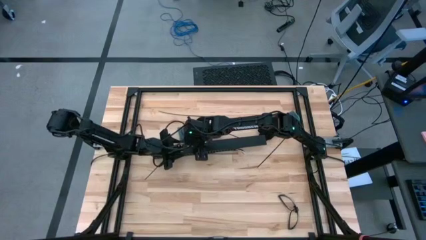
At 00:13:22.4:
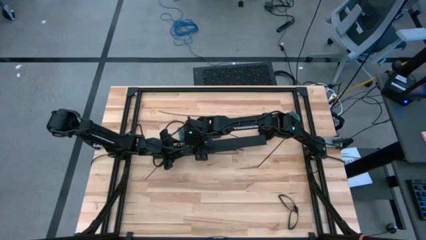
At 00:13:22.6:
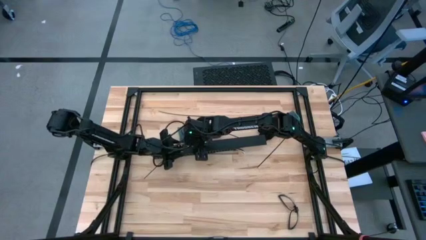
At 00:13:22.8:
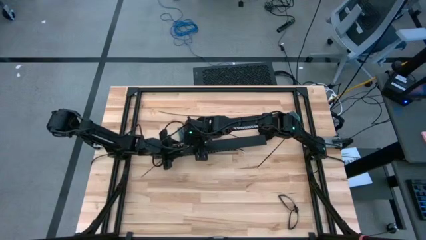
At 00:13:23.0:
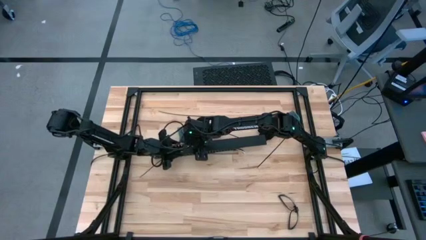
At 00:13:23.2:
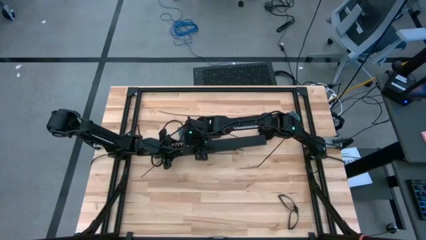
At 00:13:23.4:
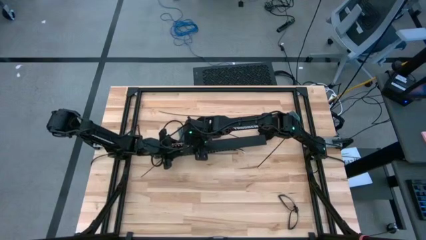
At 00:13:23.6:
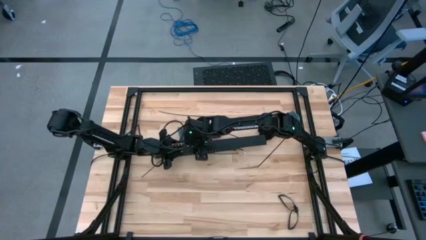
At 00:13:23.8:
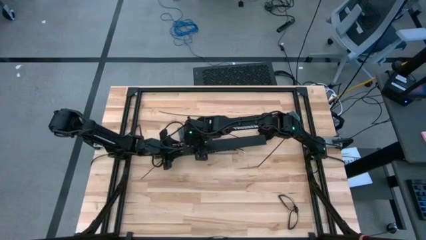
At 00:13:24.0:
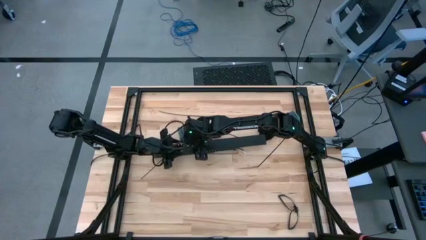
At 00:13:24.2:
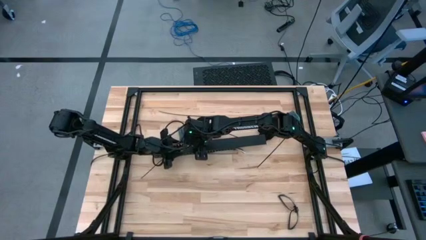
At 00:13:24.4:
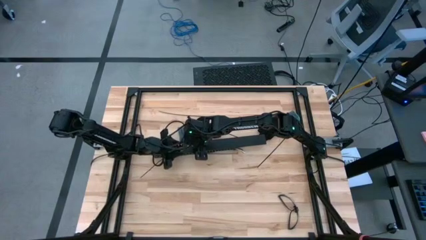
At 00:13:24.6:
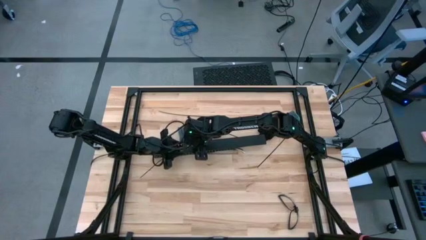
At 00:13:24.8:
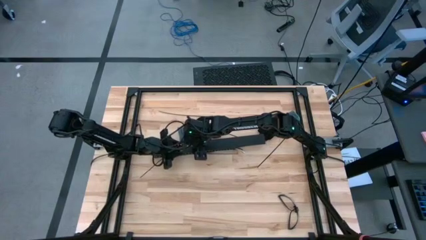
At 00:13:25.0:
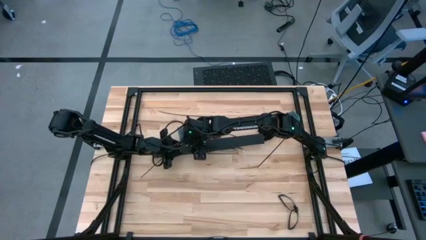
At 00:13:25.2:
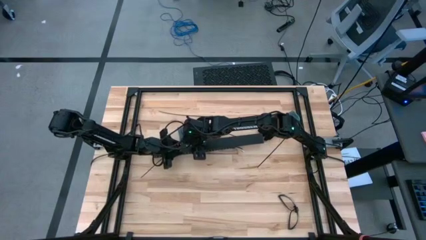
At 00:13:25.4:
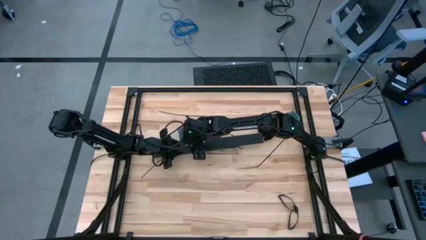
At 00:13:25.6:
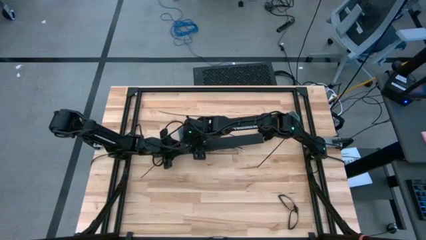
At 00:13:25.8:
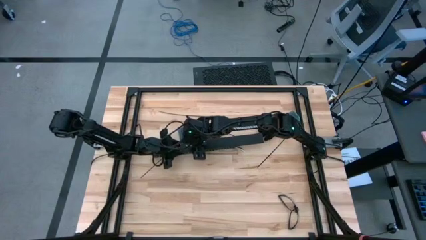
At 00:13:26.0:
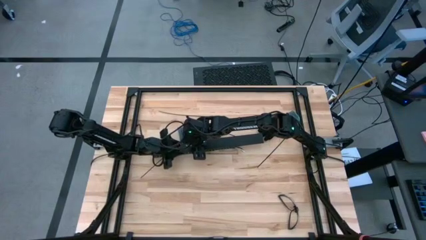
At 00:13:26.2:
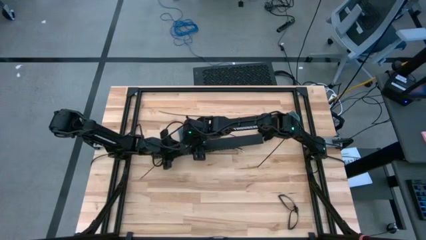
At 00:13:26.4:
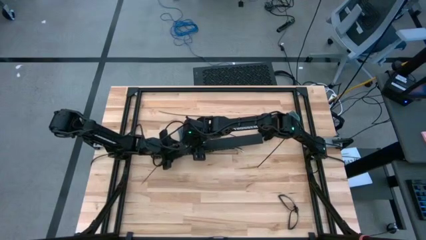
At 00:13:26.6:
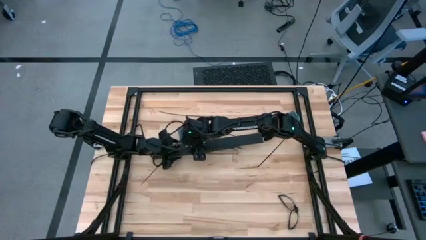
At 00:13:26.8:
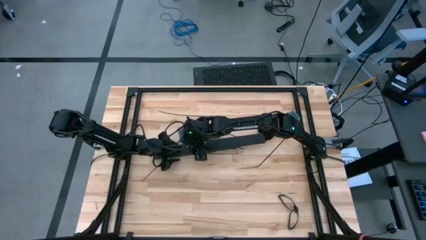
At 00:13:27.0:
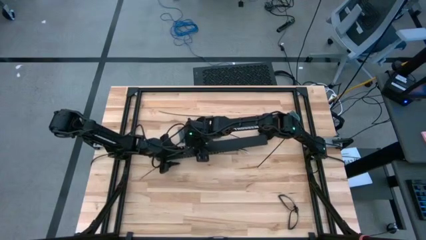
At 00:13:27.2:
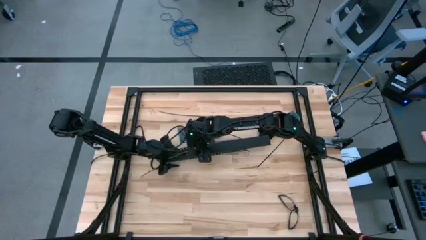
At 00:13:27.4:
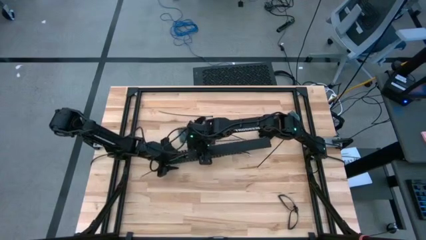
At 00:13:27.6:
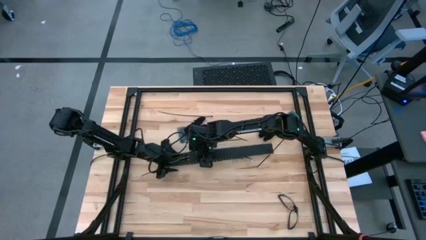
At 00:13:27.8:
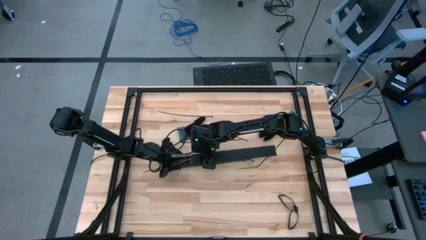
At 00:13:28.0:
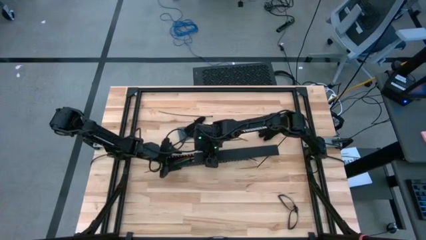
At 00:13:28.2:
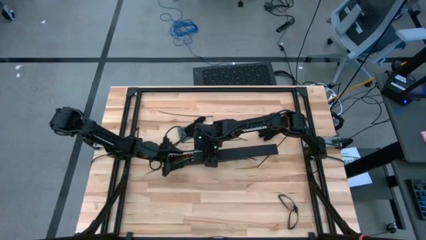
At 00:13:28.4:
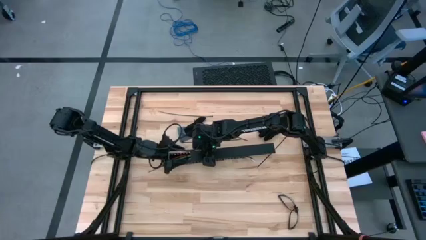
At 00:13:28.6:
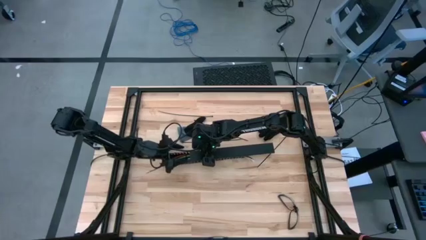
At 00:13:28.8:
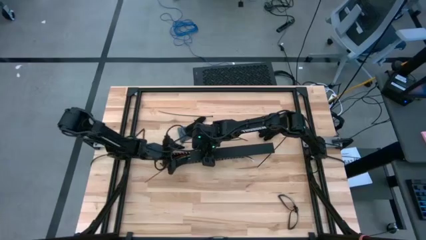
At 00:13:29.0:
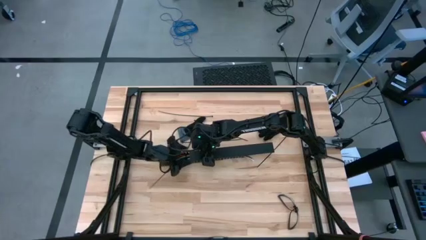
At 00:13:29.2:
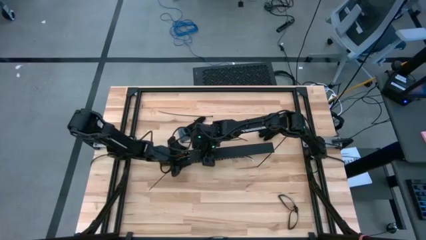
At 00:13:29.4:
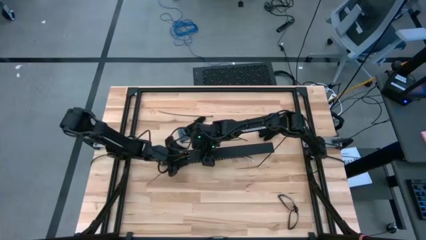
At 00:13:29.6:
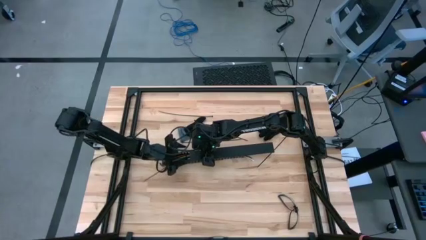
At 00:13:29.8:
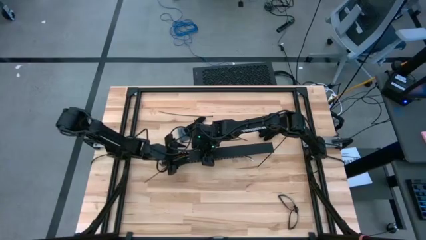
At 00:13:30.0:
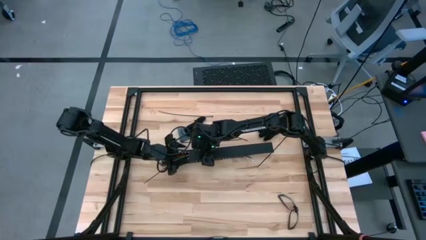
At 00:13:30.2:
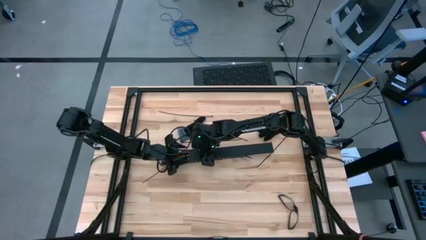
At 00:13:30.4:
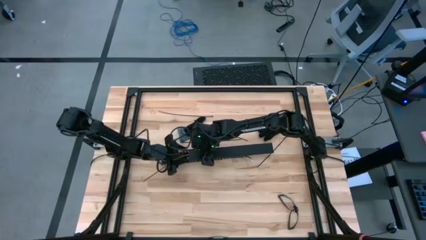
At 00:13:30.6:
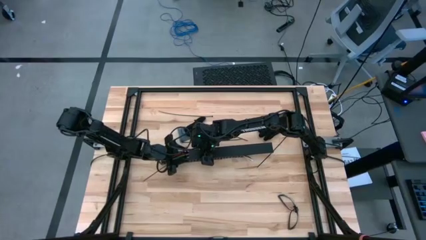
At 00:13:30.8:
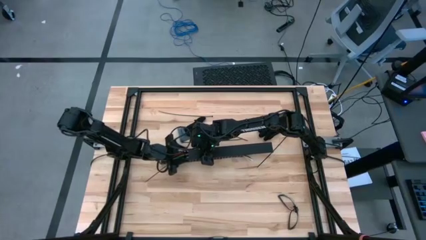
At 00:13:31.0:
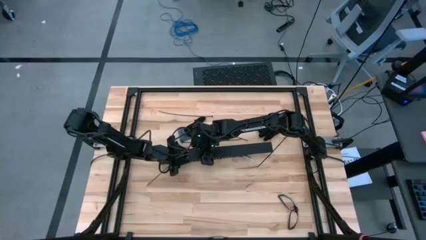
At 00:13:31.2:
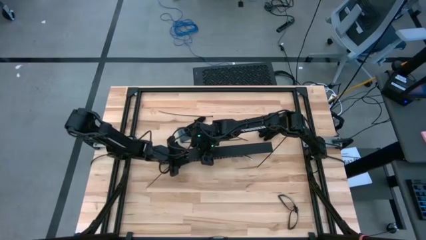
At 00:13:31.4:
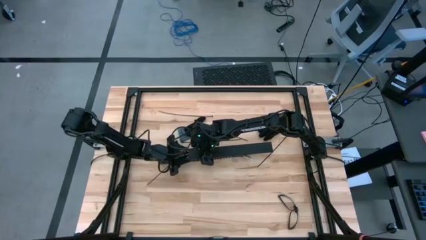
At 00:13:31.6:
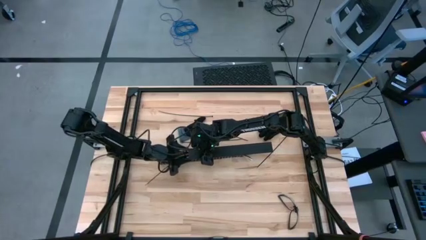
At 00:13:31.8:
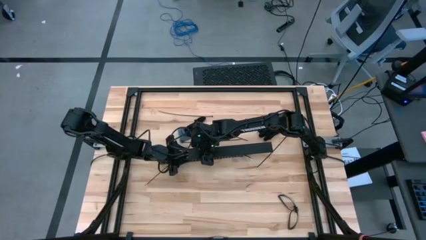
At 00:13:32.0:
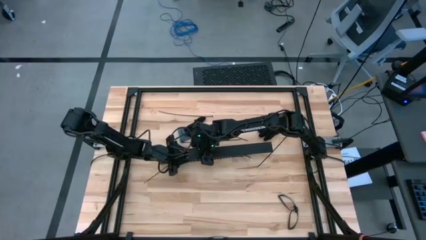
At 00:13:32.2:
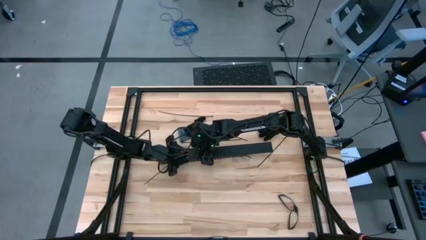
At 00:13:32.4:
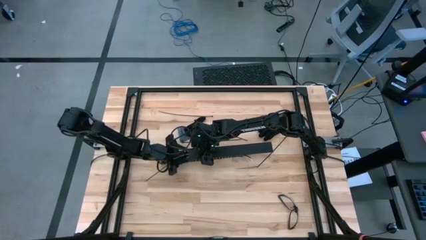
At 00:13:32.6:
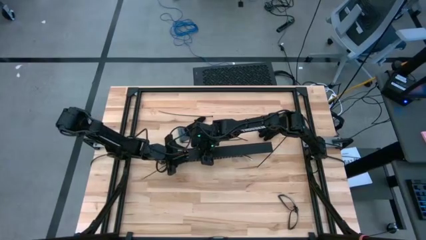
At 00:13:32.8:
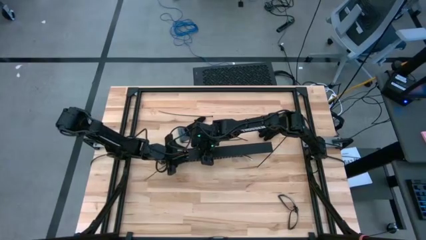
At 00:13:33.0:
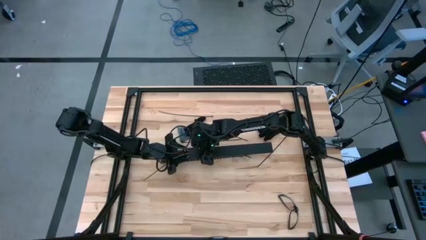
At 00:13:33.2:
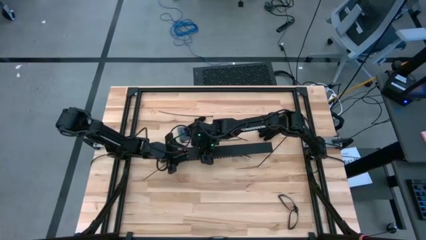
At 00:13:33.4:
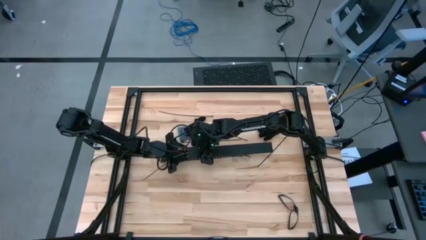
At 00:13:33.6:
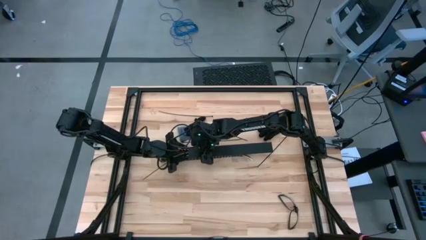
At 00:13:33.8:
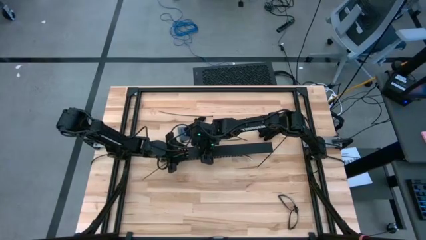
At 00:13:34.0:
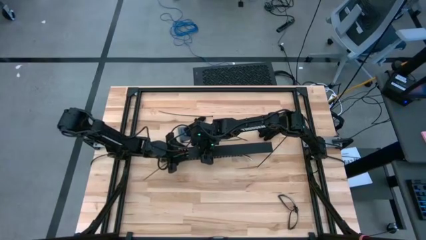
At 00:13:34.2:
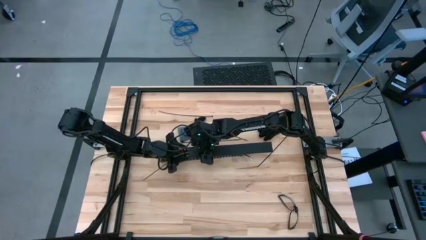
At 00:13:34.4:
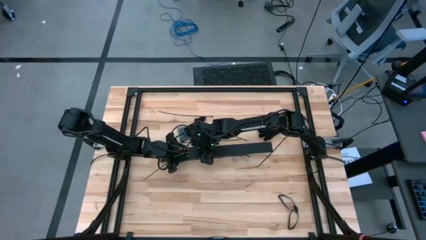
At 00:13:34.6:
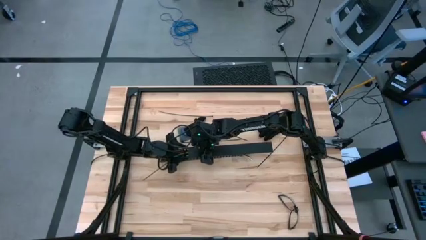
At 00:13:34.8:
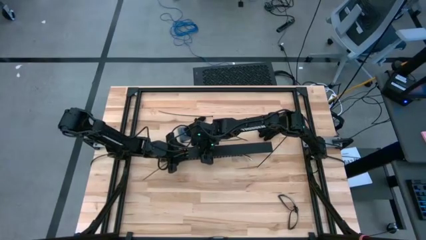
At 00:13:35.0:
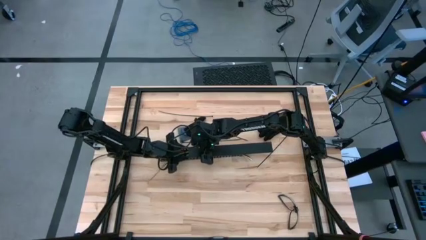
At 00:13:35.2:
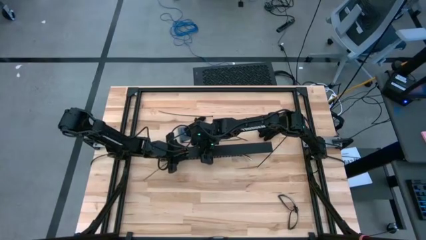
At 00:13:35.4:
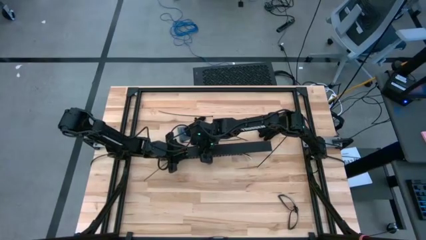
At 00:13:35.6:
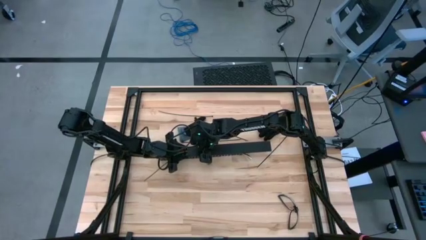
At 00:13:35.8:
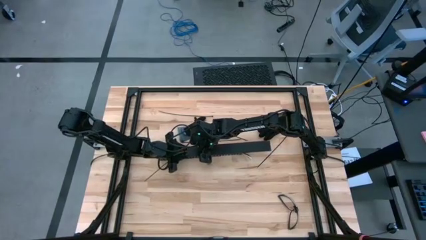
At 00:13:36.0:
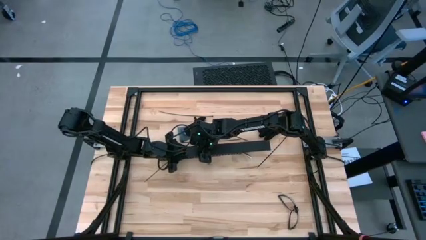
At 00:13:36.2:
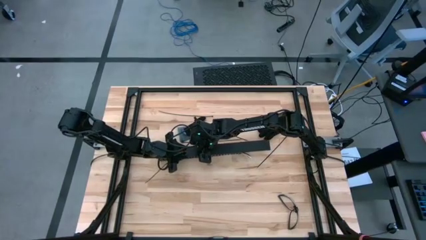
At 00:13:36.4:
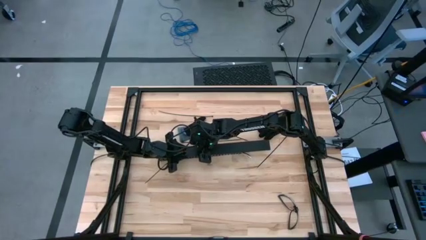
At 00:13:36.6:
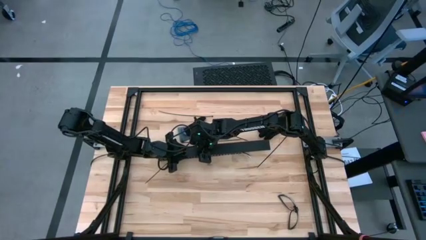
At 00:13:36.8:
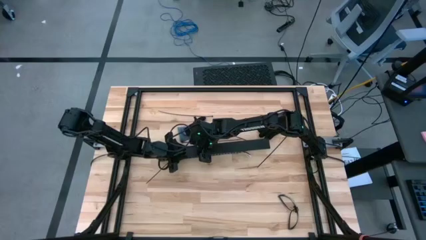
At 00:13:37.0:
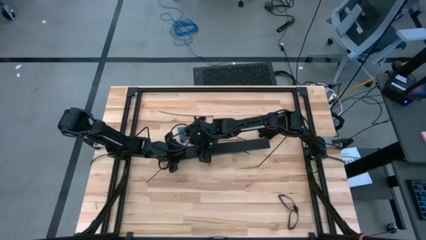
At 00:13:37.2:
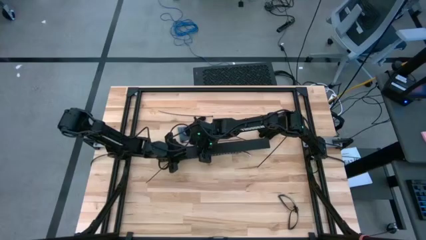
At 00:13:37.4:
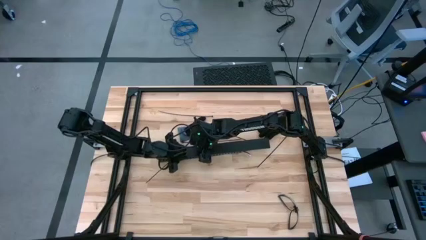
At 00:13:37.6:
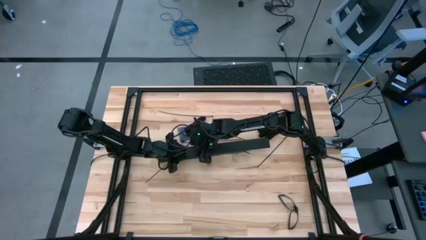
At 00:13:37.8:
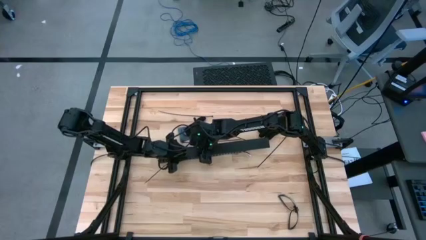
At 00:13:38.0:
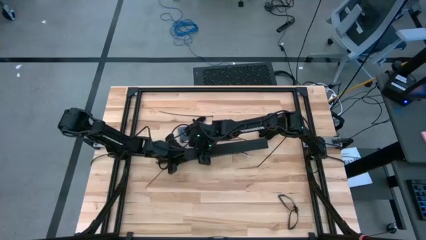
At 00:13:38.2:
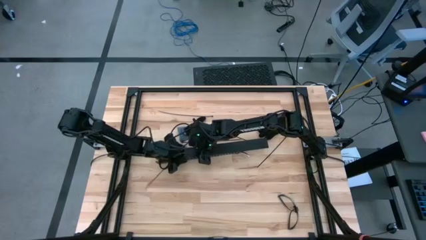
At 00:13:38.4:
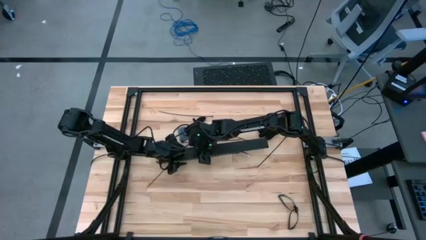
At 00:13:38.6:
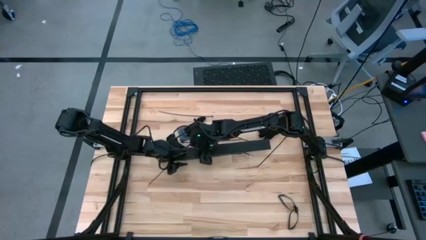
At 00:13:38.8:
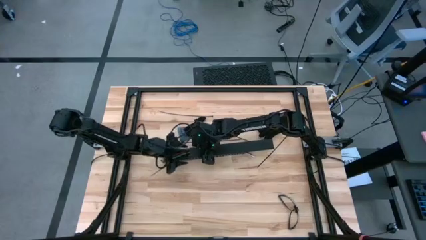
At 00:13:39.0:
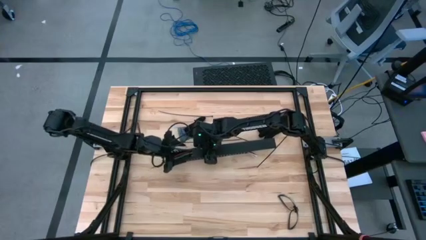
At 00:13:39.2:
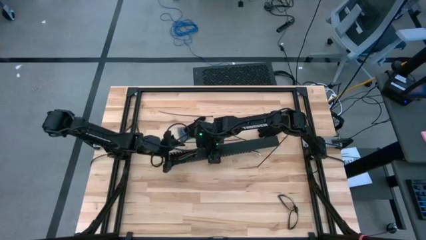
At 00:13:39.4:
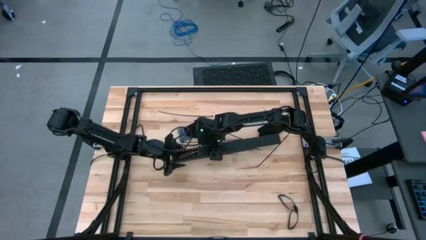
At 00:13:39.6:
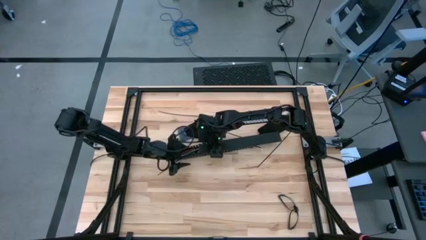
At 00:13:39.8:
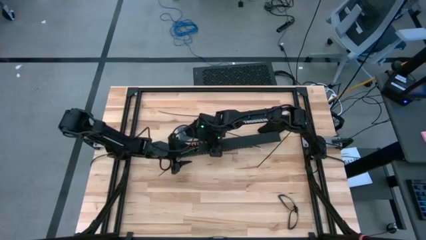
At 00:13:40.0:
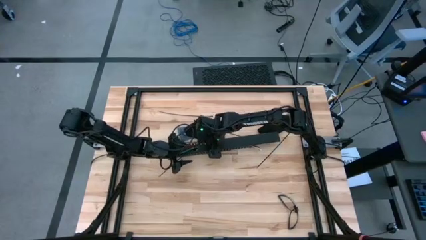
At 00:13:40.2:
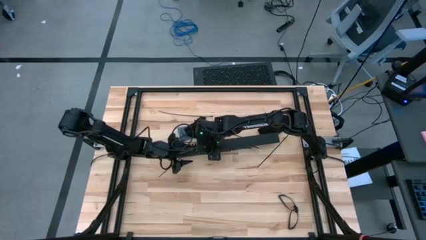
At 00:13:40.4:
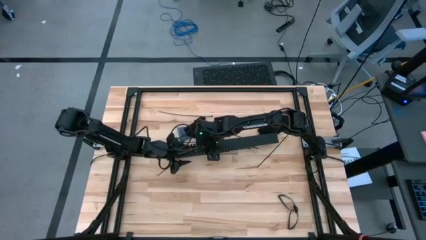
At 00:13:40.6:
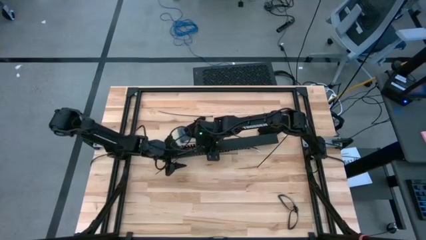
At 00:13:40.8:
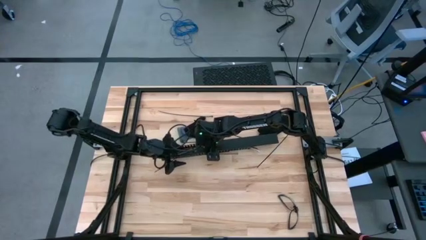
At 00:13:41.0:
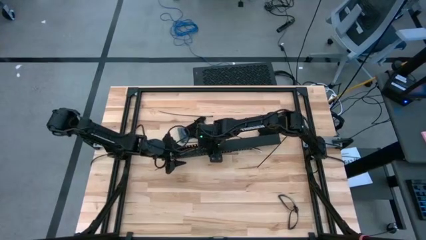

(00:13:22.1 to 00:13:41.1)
Task: Ziptie cables
Close the cable duct
